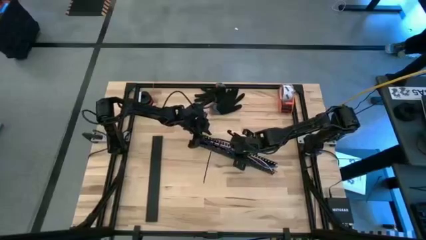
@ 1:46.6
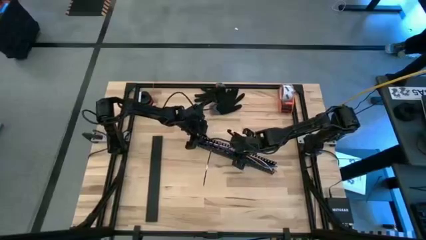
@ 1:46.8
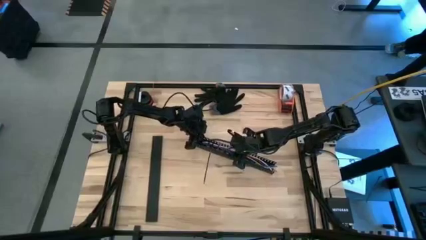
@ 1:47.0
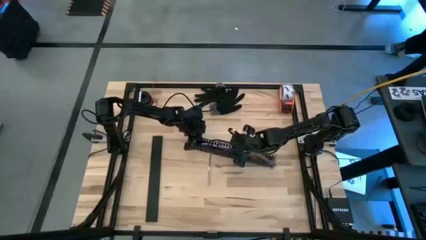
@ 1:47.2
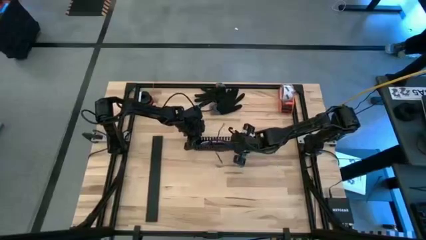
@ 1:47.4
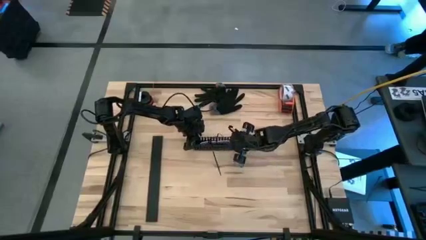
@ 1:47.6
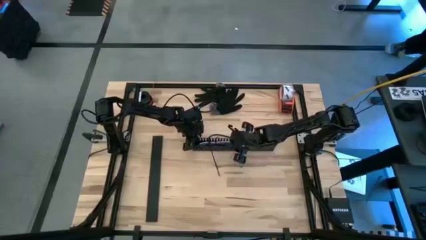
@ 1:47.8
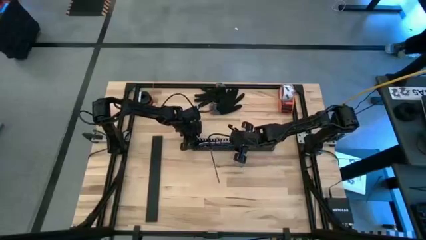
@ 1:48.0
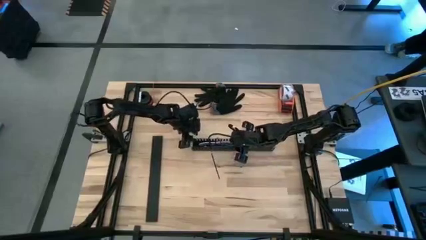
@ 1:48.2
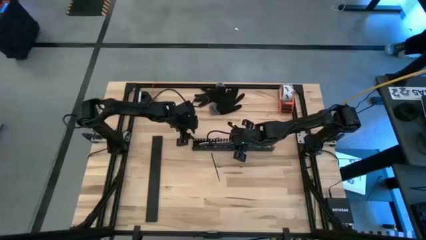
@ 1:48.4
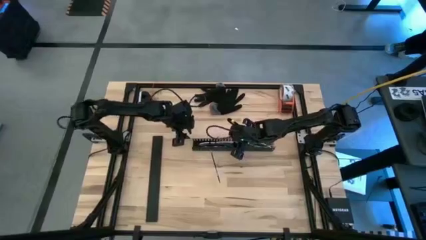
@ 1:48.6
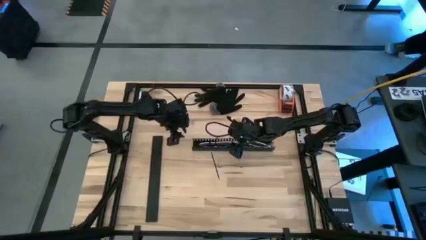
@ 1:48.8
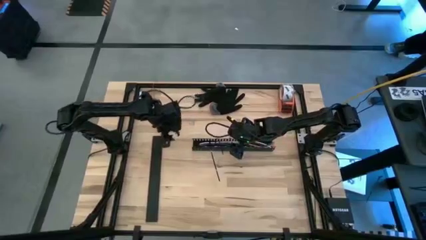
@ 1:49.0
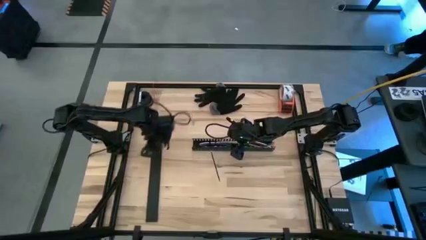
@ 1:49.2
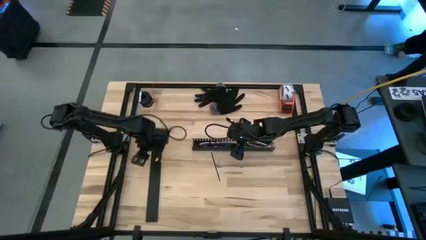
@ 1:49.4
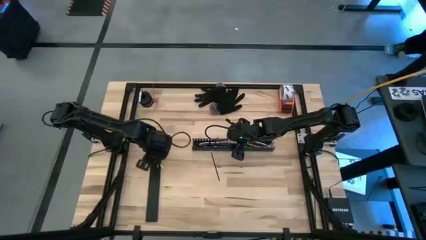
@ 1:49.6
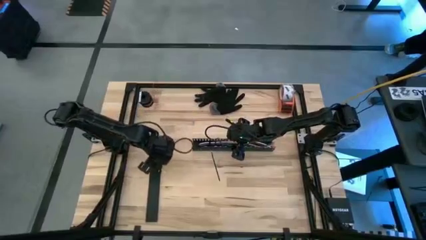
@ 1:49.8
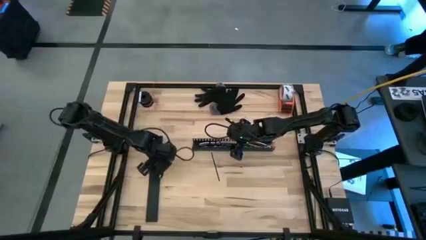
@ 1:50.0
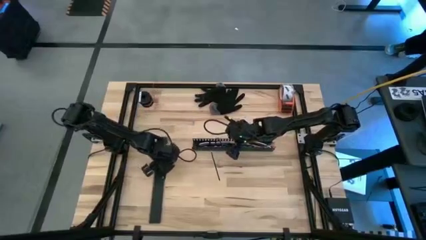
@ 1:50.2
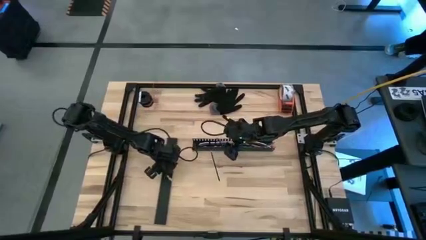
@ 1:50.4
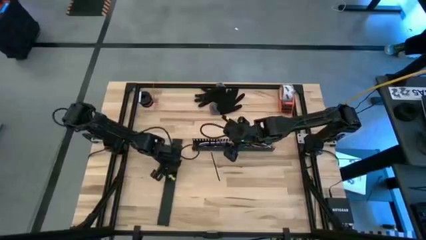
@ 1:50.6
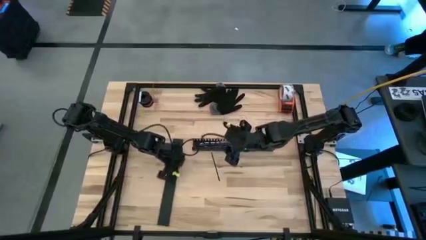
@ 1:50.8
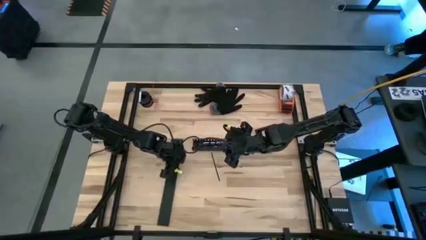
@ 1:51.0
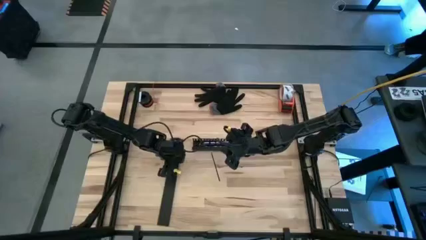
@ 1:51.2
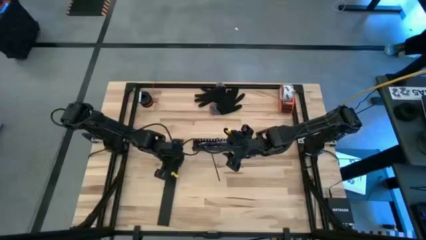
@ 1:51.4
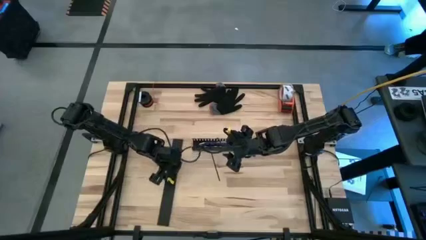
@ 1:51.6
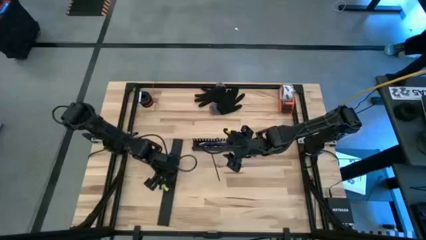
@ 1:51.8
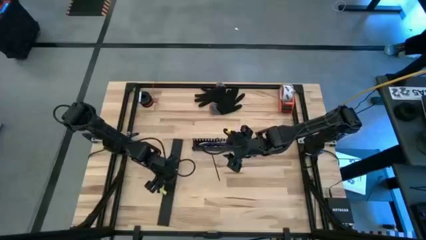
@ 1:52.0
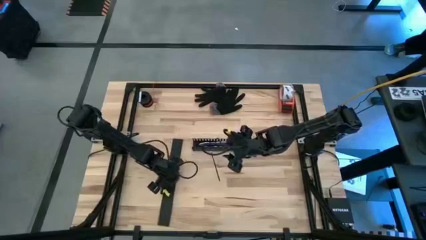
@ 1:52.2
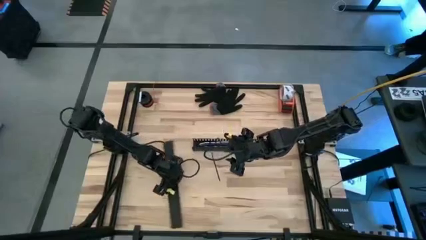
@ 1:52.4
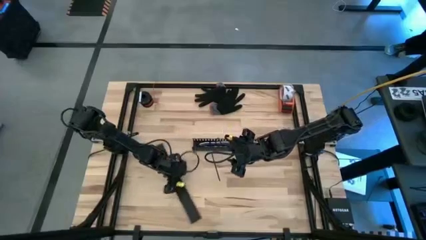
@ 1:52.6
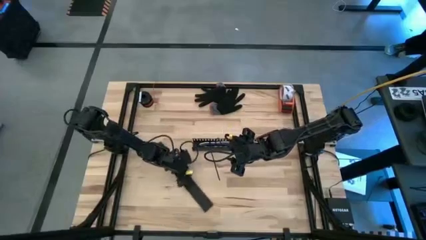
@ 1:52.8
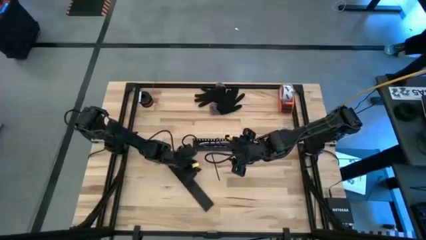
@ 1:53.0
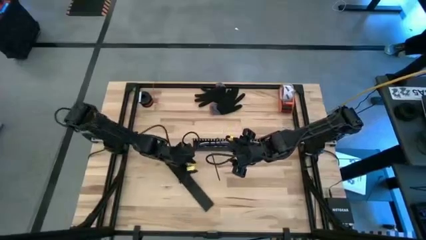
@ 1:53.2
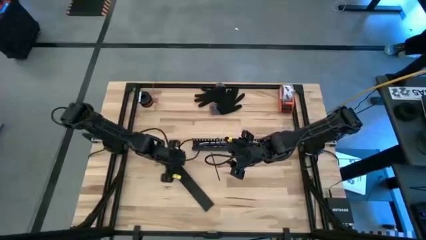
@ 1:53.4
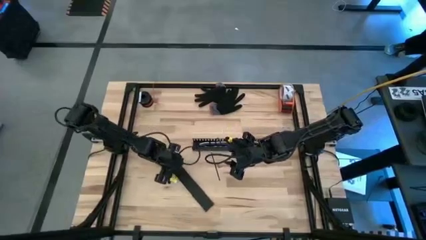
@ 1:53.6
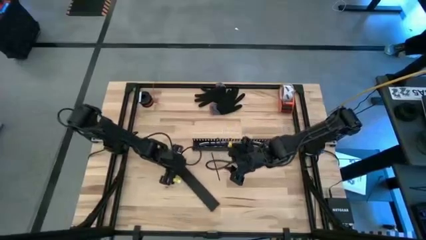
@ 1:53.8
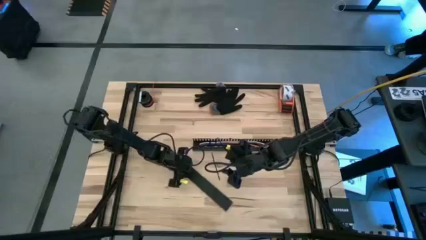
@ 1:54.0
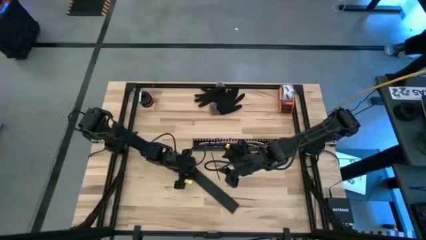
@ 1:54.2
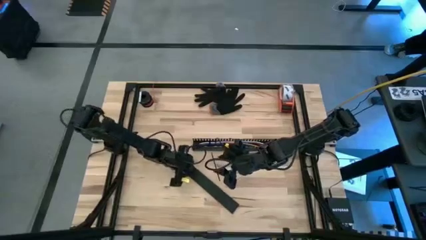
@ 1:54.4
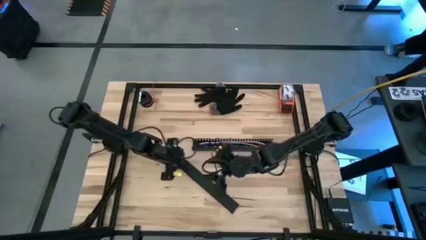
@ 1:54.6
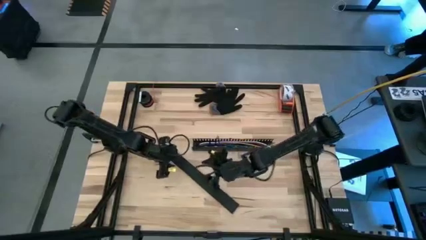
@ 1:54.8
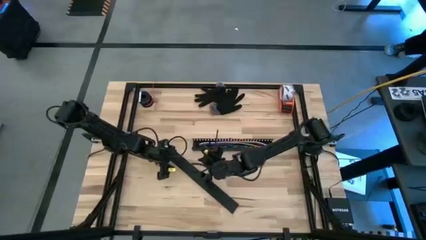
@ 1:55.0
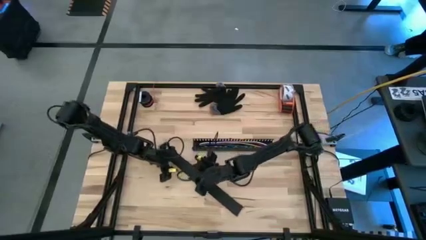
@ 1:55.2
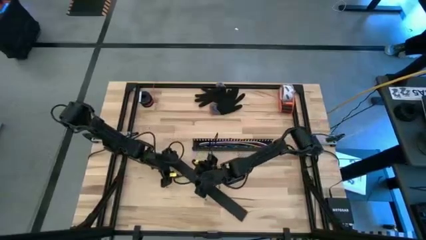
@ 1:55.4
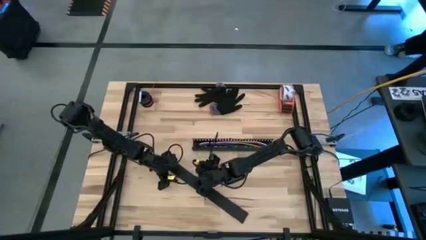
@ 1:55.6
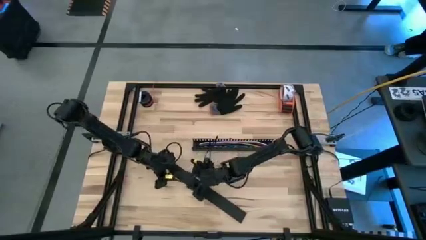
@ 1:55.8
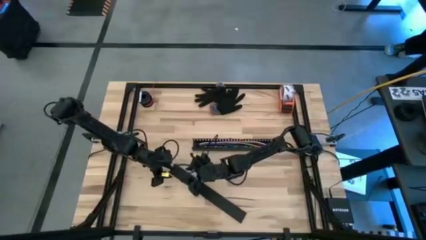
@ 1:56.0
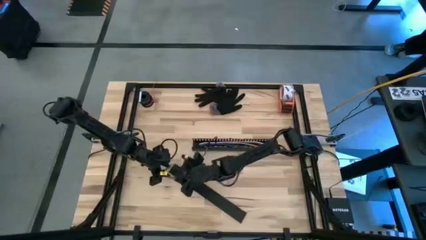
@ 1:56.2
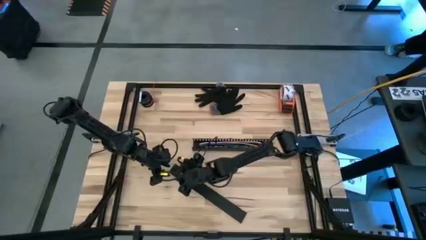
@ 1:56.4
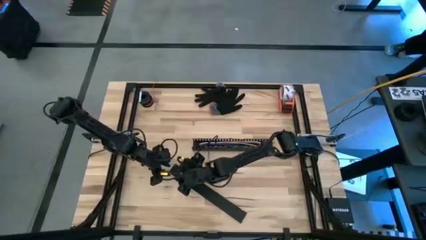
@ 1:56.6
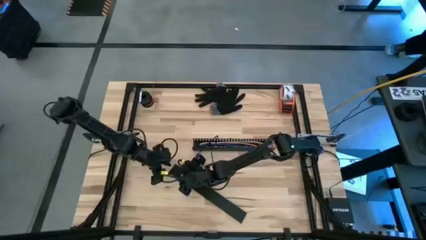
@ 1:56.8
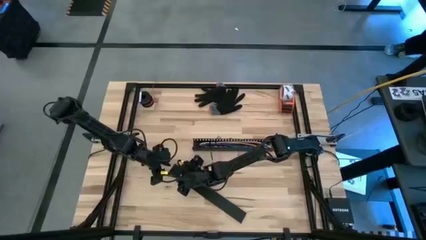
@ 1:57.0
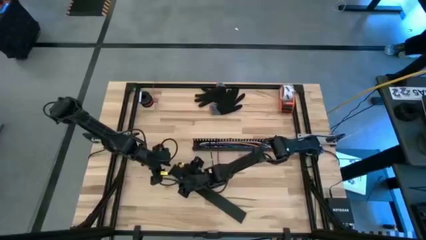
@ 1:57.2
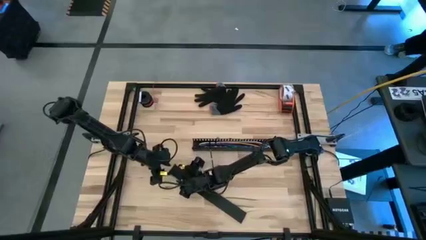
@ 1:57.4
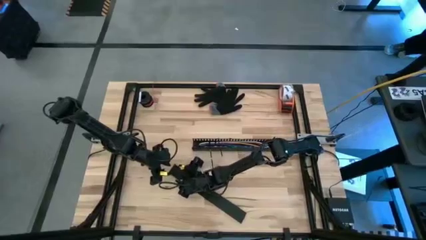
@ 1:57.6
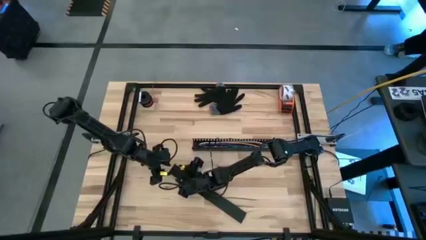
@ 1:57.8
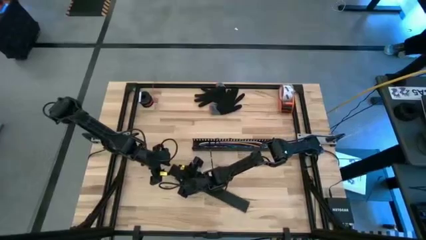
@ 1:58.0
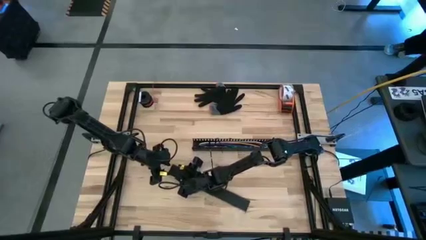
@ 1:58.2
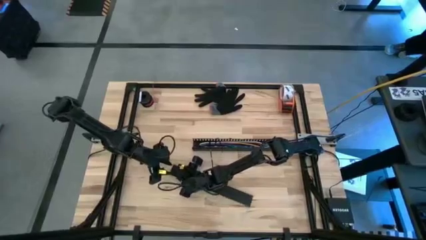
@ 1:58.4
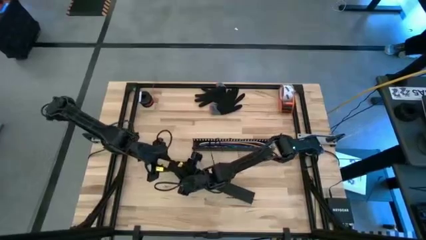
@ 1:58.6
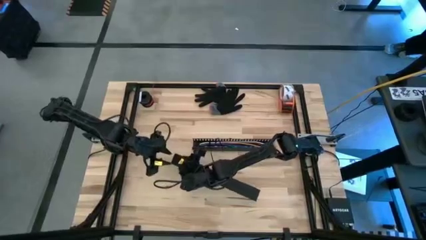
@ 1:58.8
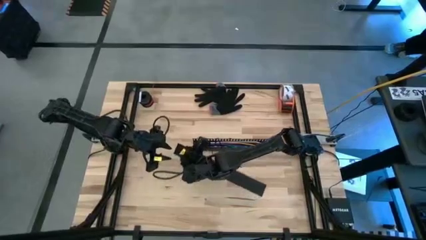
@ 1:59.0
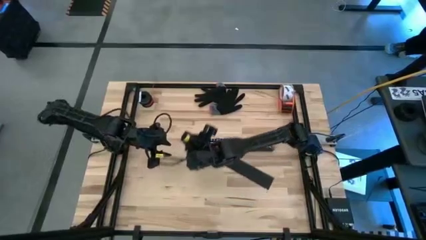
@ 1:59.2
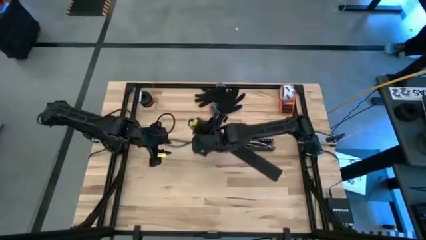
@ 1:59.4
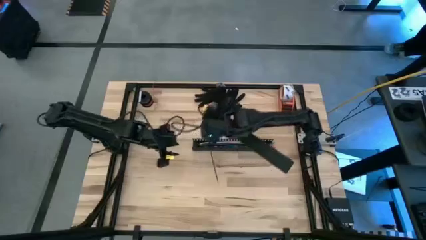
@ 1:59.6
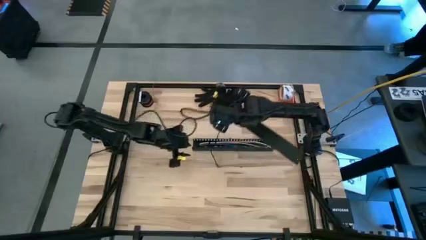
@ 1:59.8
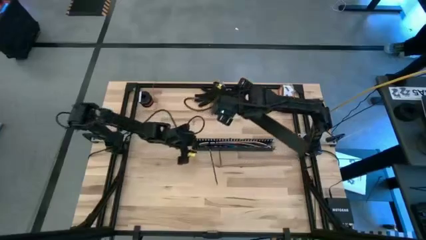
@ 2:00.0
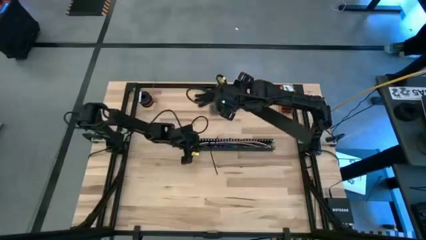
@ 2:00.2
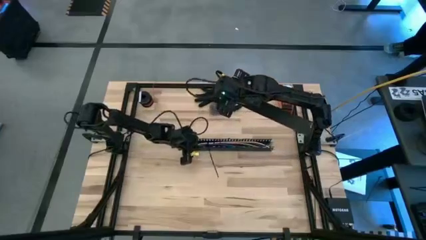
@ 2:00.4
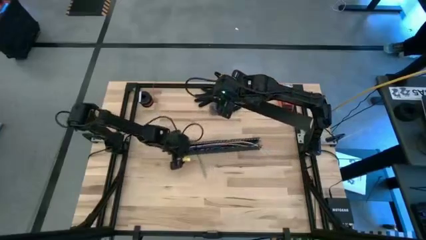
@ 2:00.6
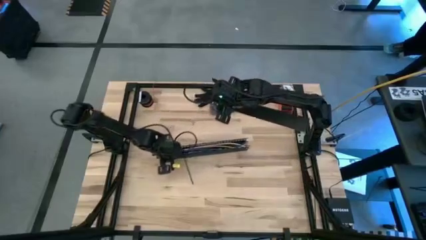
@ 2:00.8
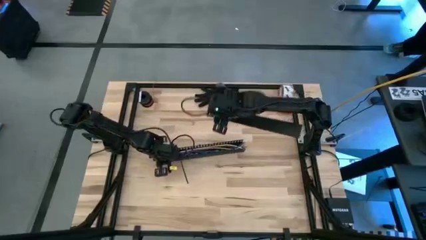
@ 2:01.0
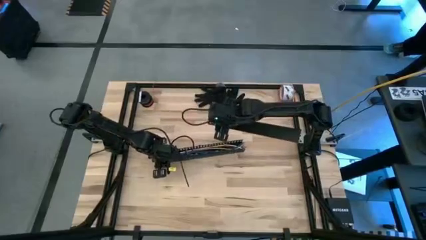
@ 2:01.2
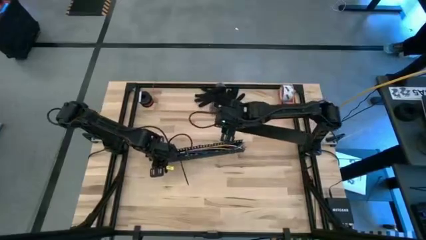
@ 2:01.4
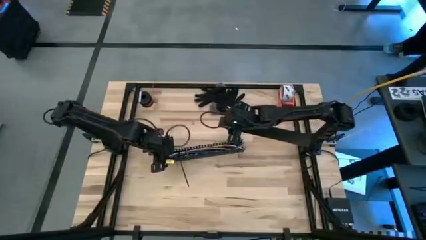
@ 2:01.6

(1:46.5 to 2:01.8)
Task: Ziptie cables
Close the cable duct

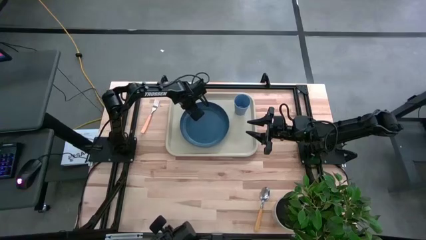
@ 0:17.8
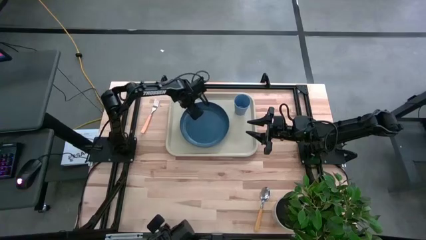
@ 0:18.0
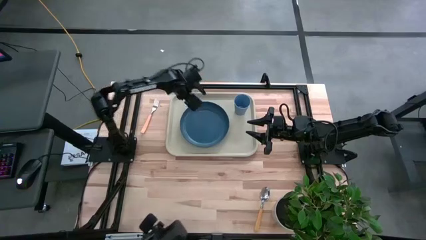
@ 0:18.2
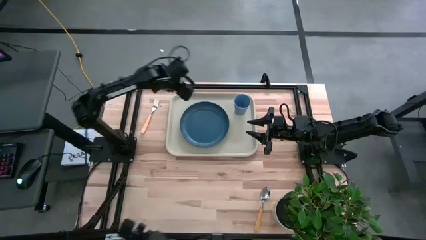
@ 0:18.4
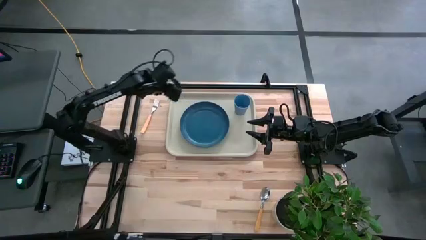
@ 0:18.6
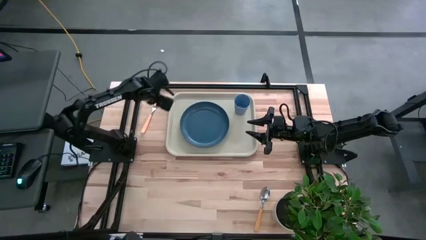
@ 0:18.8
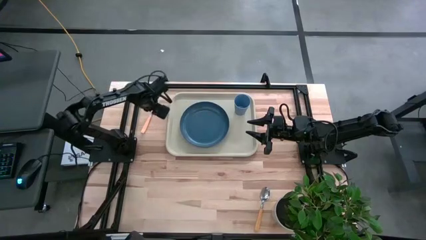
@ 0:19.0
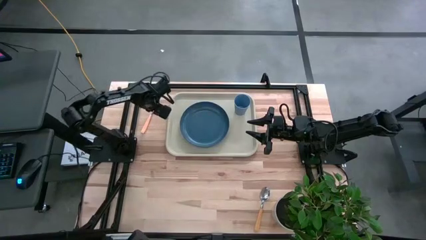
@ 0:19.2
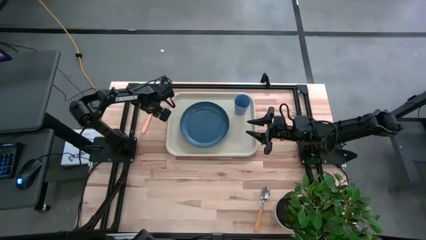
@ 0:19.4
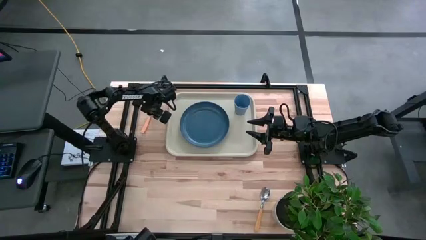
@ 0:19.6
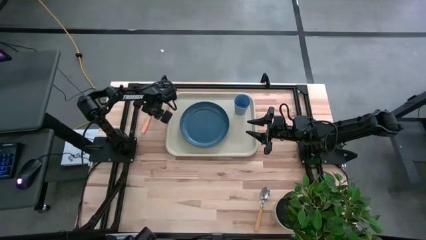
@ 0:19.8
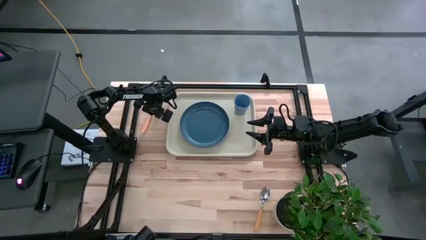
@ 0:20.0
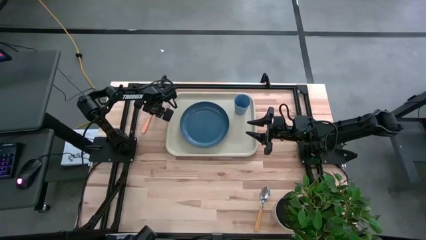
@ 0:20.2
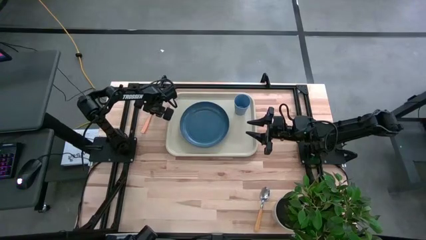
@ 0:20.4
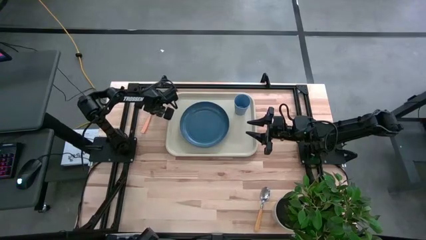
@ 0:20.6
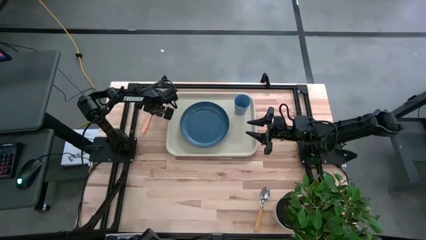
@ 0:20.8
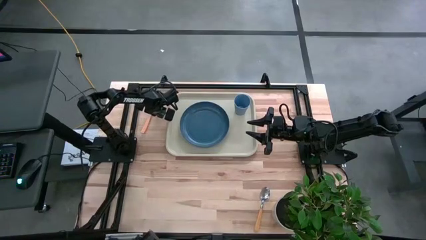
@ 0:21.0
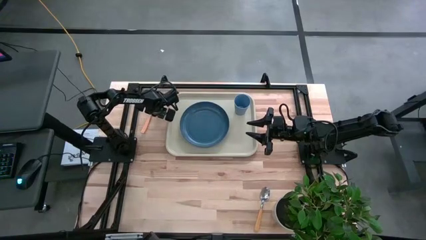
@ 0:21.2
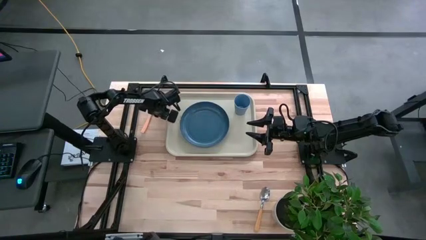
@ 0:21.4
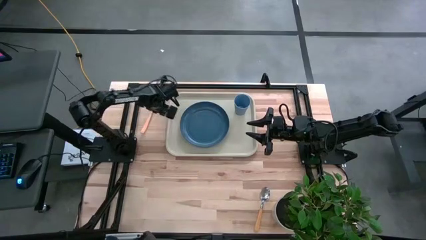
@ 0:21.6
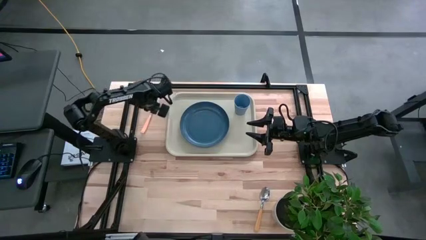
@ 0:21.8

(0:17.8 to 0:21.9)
Task: Pick and place plate/cup/fork/spoon on tray
Put the orange fork on the white tray at the left of the blue plate
